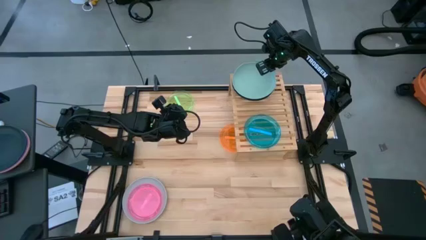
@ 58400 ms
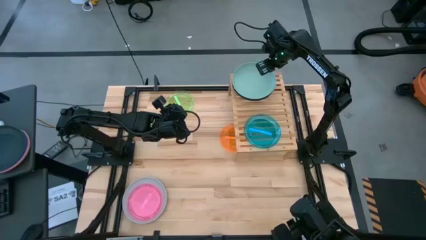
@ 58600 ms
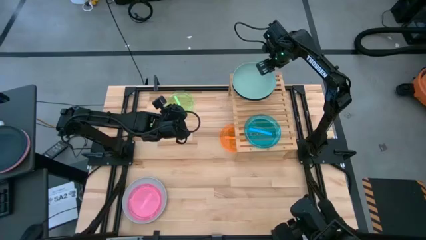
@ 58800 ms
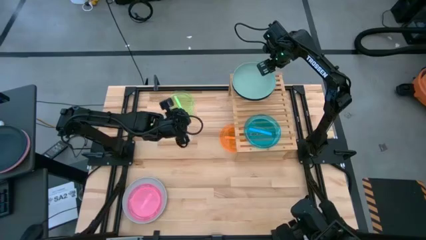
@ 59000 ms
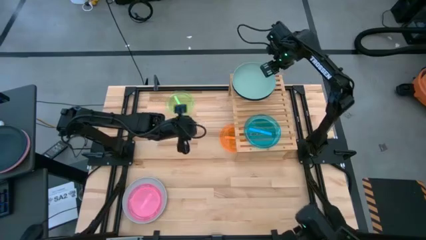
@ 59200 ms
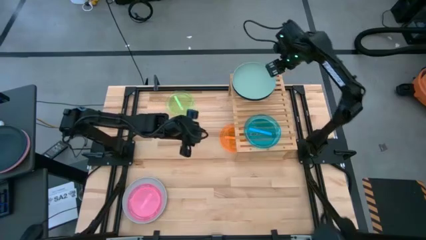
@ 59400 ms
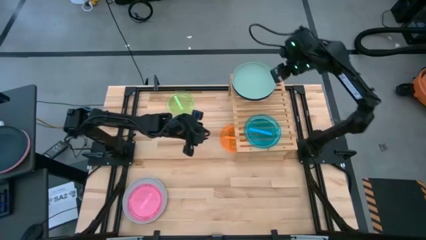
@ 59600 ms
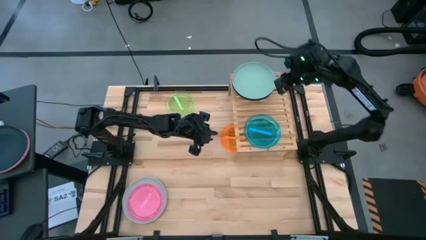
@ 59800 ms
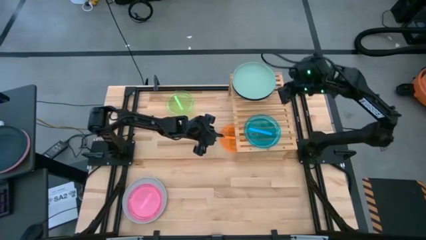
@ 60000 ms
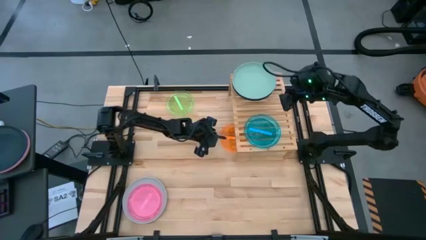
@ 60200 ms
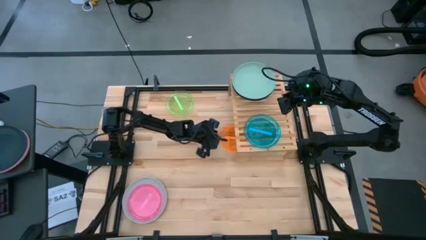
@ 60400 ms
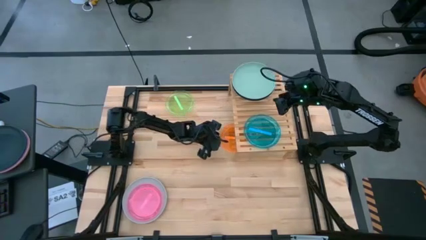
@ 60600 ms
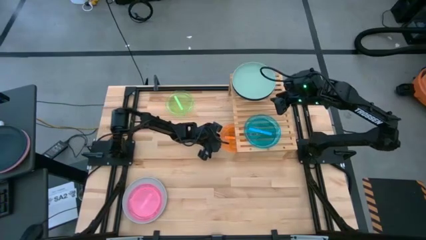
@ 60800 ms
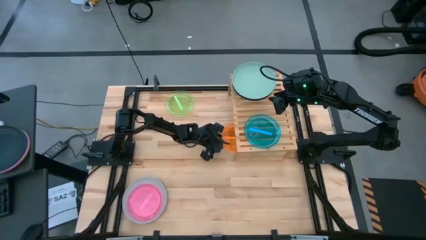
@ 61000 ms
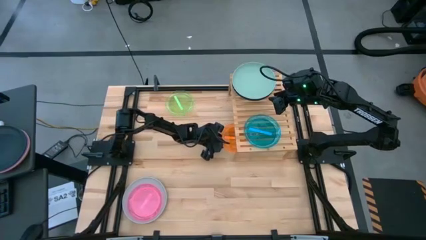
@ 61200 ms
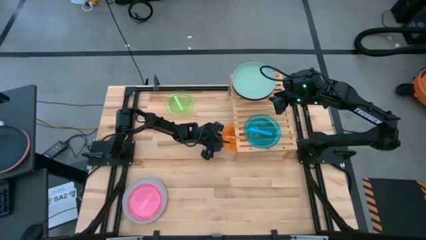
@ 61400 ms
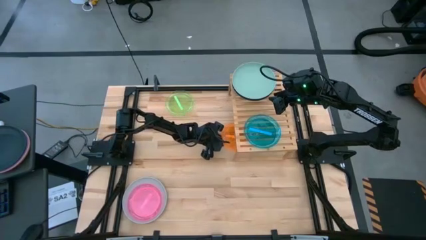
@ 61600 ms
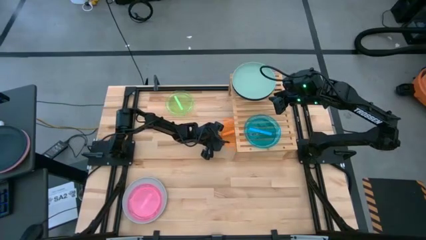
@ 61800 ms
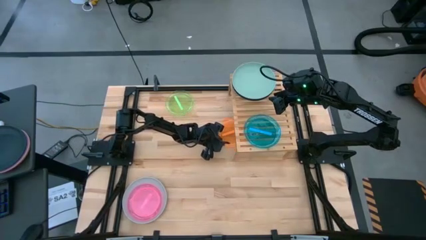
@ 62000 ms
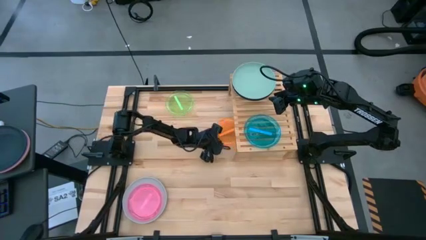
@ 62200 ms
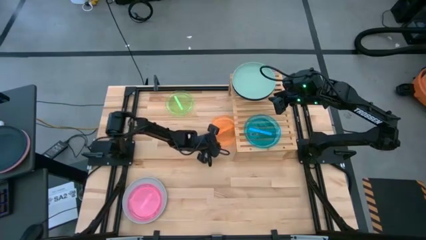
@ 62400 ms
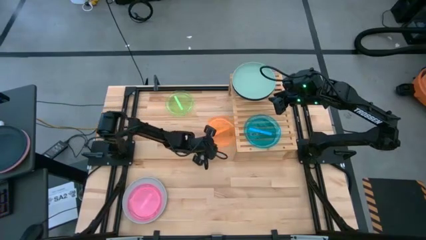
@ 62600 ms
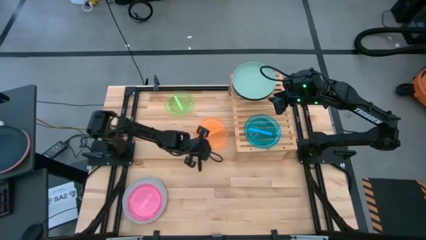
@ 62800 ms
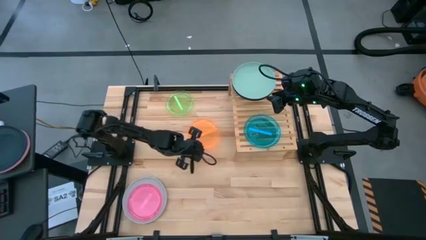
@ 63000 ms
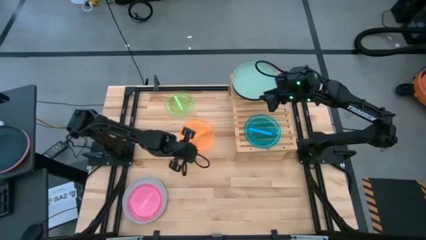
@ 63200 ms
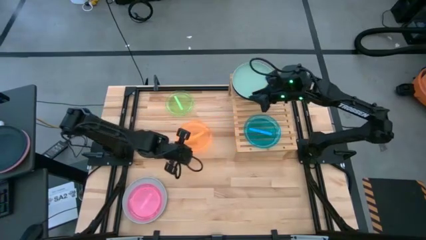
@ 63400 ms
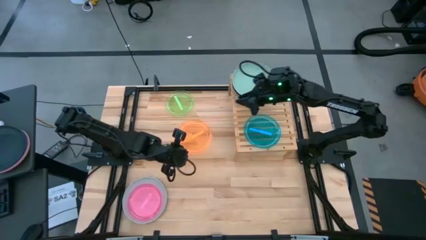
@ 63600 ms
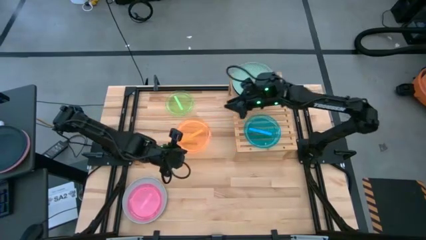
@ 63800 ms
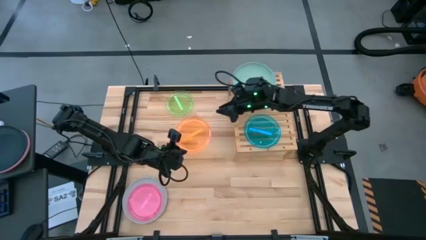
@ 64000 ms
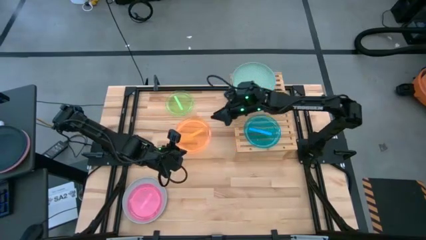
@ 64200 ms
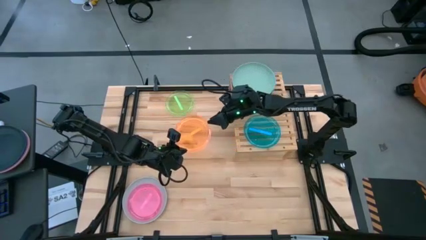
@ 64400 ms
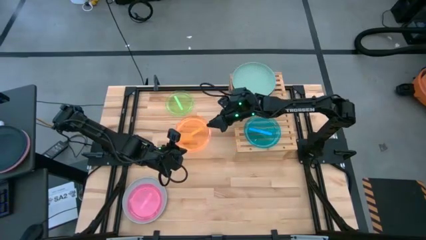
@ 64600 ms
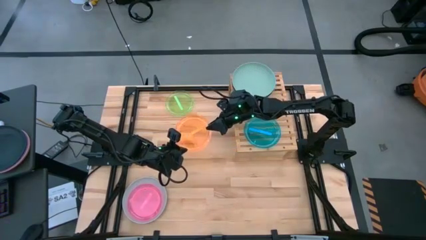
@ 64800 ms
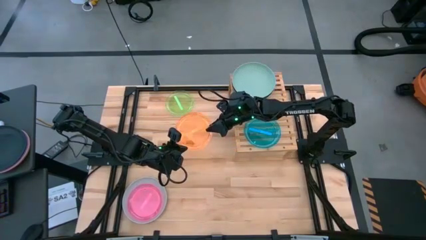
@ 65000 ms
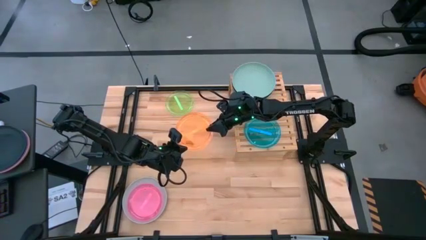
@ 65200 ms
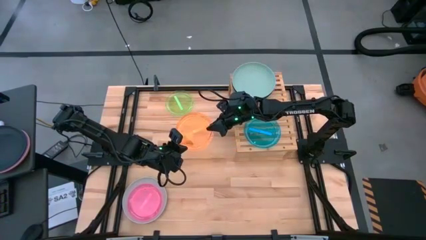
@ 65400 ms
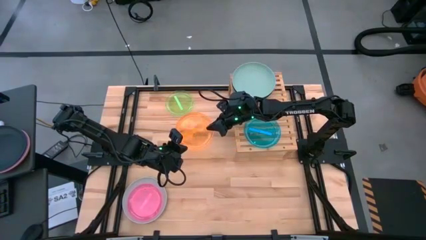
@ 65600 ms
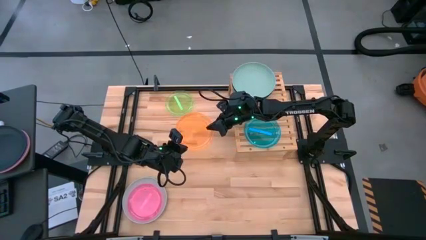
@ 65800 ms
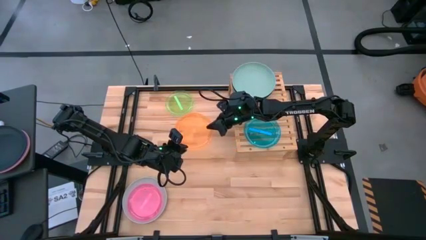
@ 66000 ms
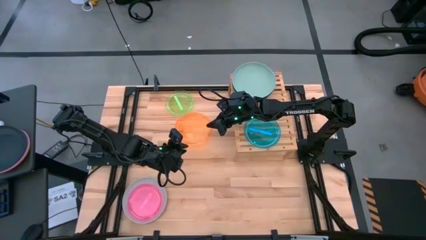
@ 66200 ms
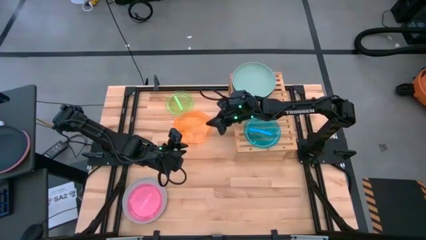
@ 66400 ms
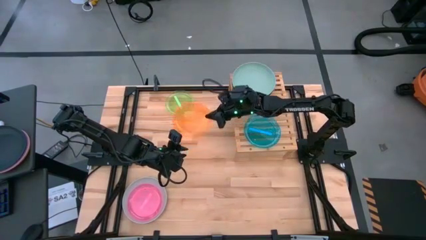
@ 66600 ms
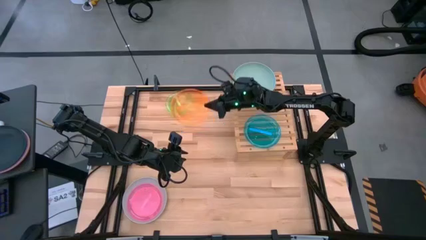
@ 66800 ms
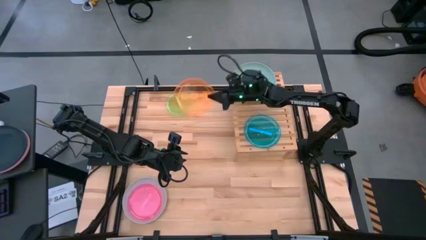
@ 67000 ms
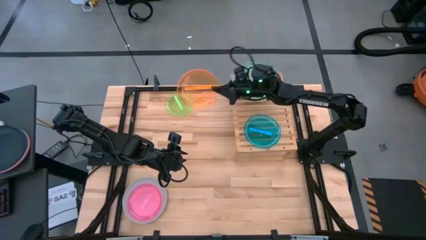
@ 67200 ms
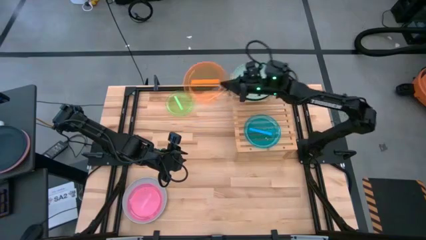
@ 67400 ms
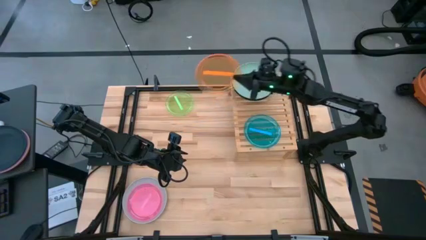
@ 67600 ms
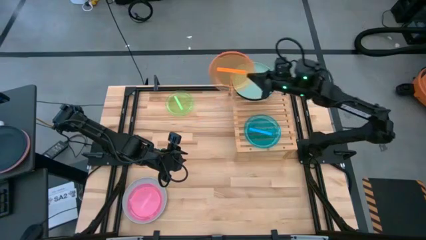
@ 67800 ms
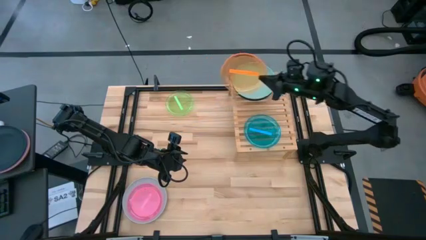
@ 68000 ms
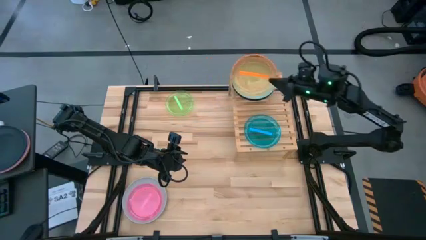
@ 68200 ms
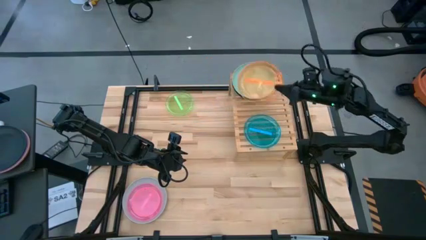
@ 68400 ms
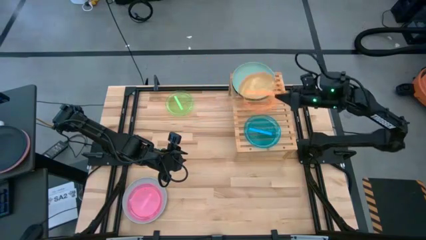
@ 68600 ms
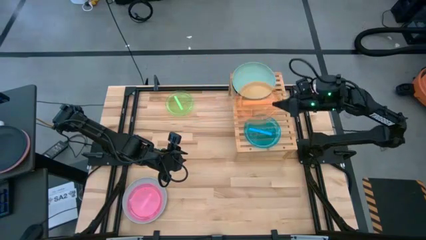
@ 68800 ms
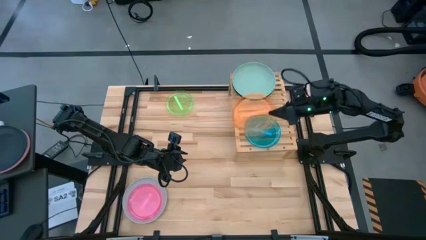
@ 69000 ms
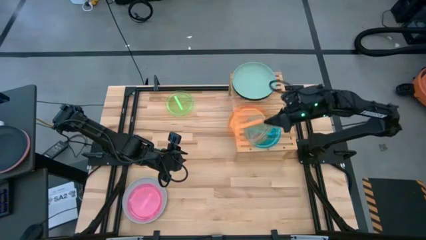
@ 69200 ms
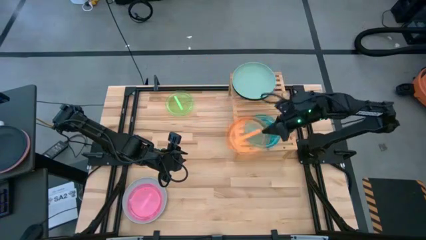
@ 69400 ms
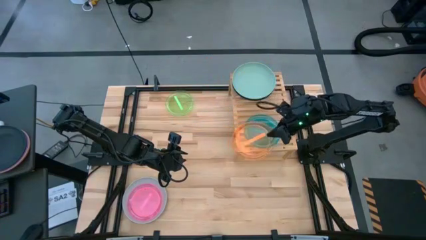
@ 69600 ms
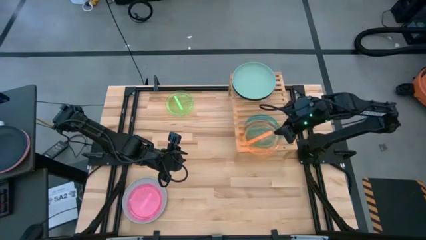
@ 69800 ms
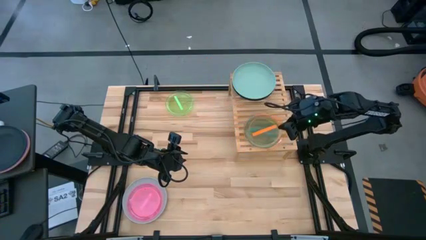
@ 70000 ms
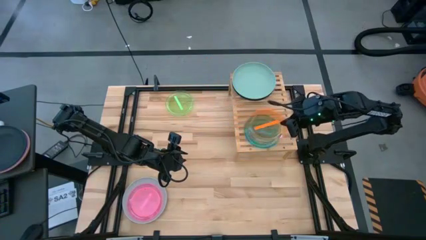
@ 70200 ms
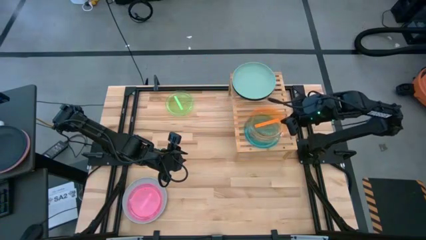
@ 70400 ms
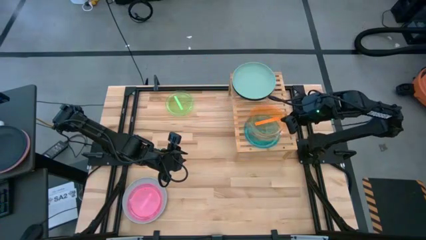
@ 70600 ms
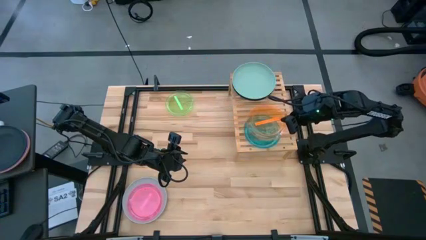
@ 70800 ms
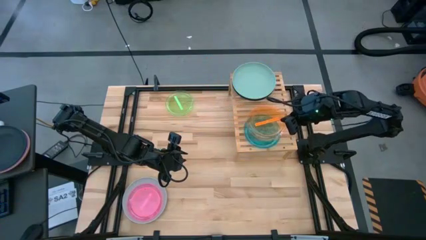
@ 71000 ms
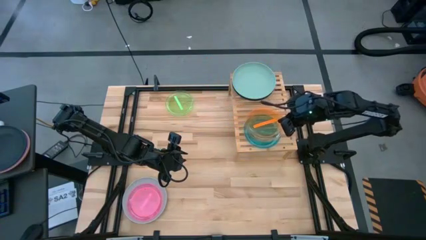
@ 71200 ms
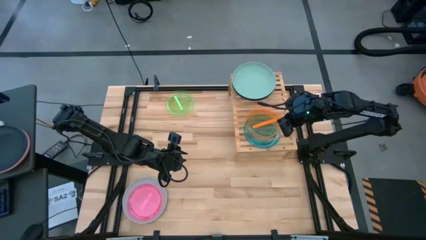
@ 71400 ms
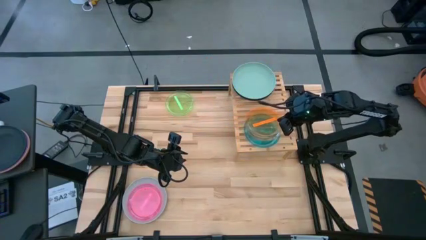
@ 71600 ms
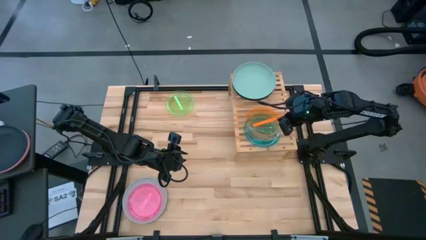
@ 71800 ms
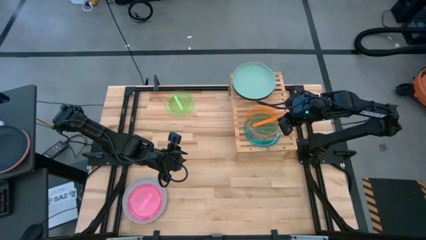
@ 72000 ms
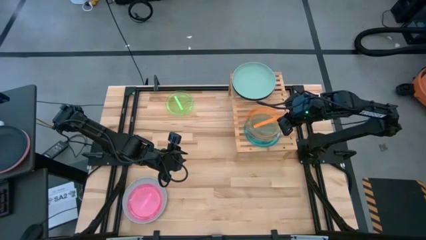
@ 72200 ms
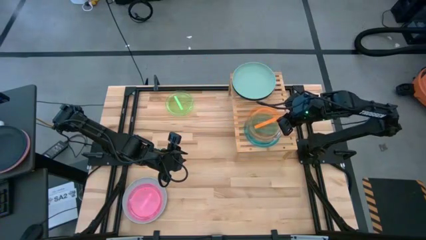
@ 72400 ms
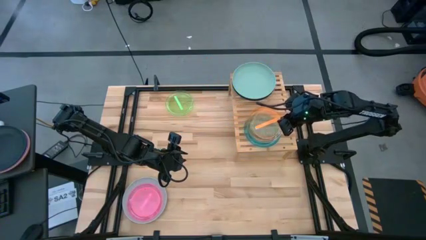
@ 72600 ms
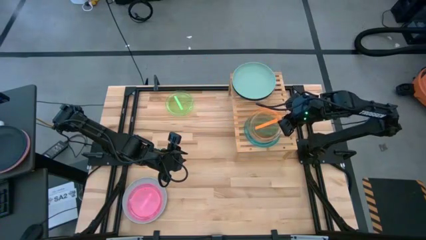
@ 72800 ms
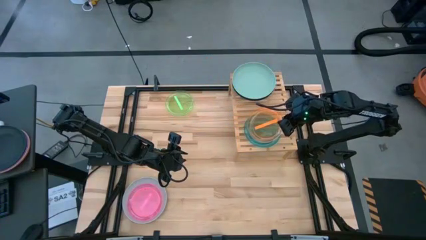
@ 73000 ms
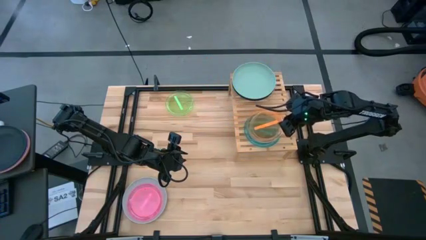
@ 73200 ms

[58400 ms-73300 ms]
Task: Place and stack plates onto a shelf
Stack the light orange plate on top of the light blue plate on the shelf
